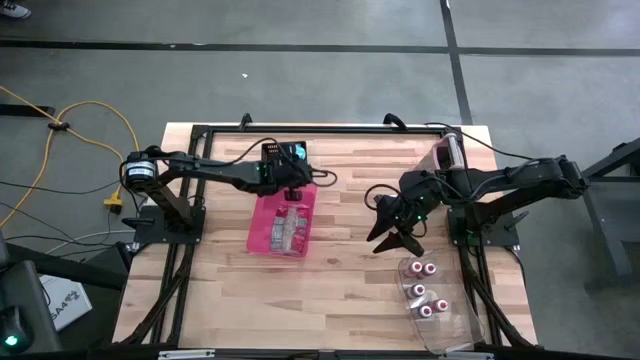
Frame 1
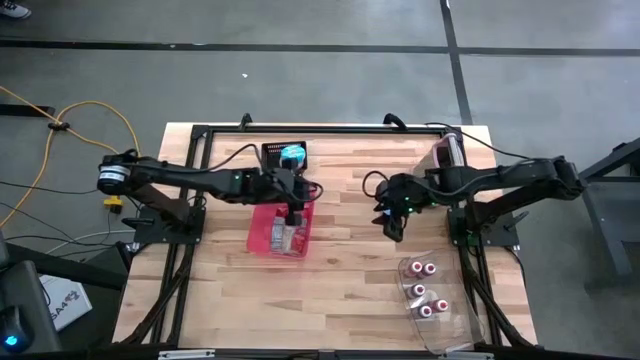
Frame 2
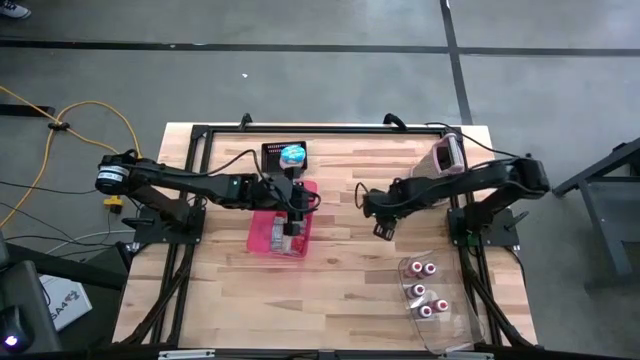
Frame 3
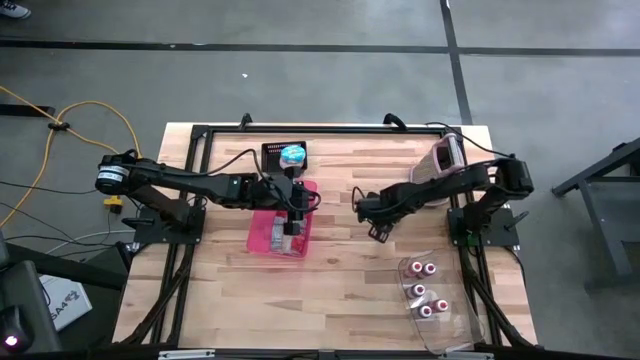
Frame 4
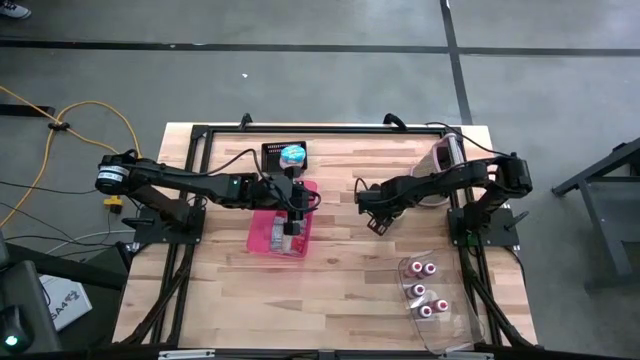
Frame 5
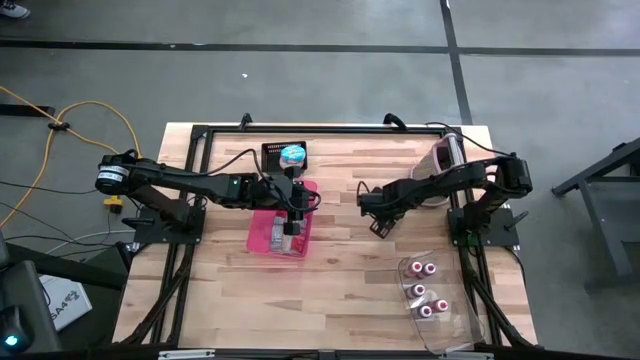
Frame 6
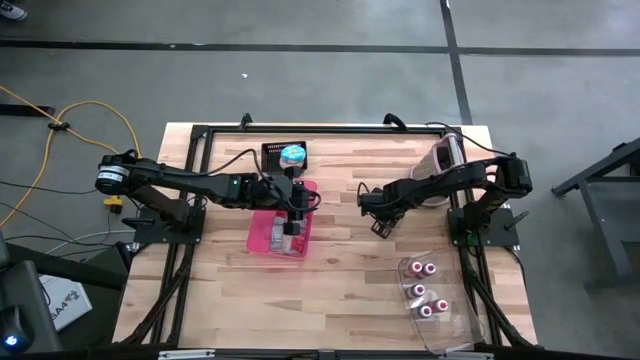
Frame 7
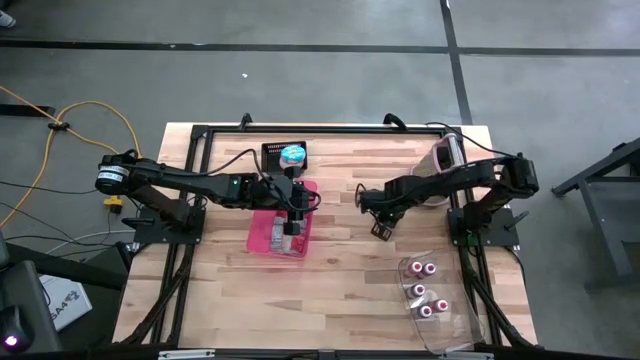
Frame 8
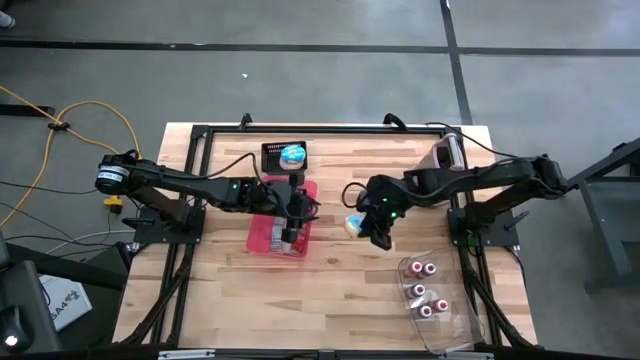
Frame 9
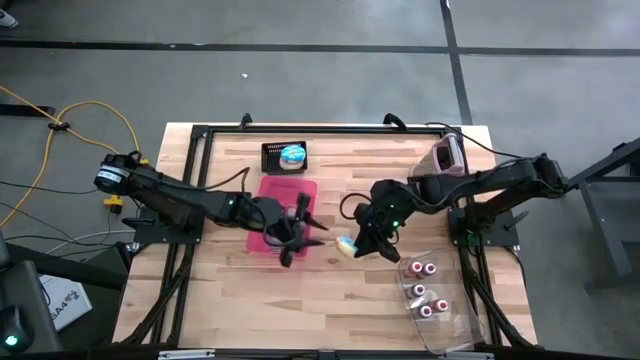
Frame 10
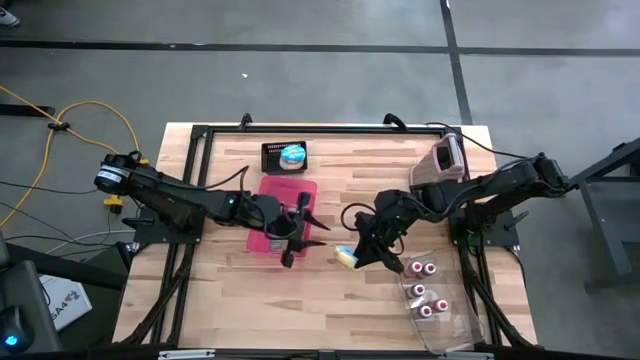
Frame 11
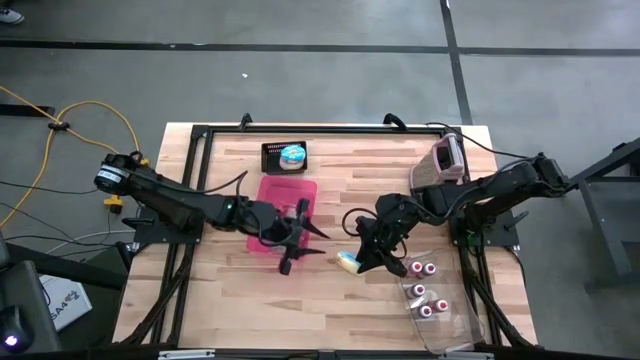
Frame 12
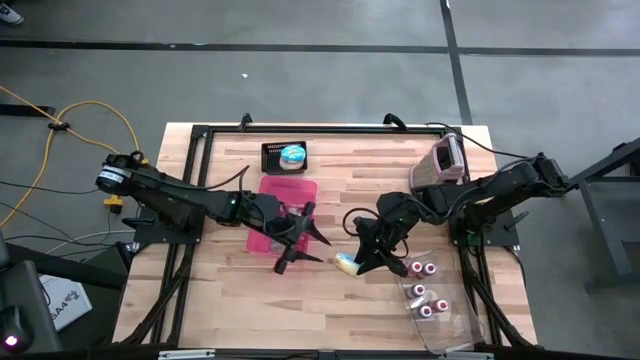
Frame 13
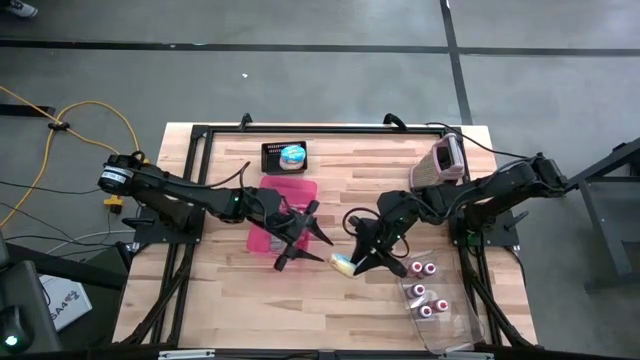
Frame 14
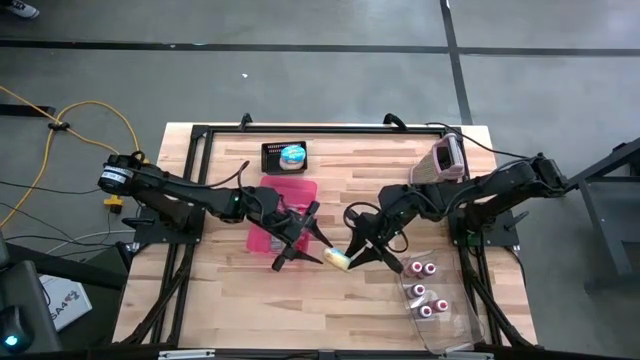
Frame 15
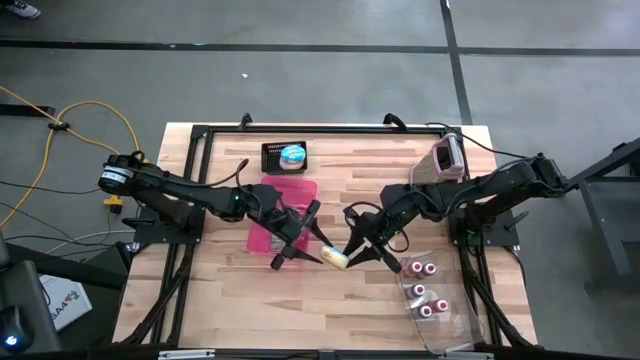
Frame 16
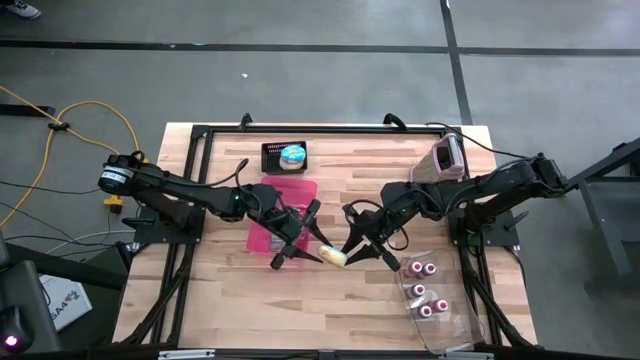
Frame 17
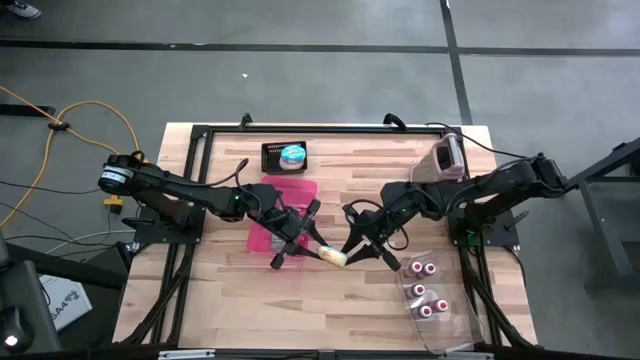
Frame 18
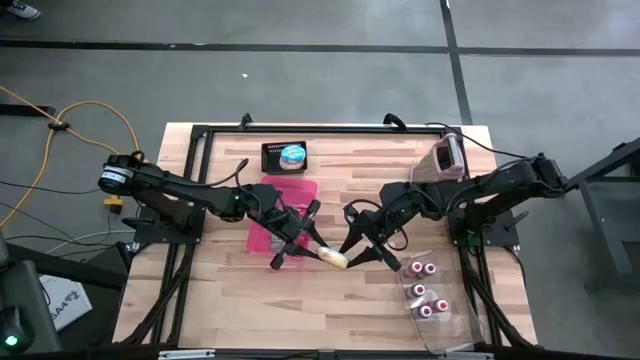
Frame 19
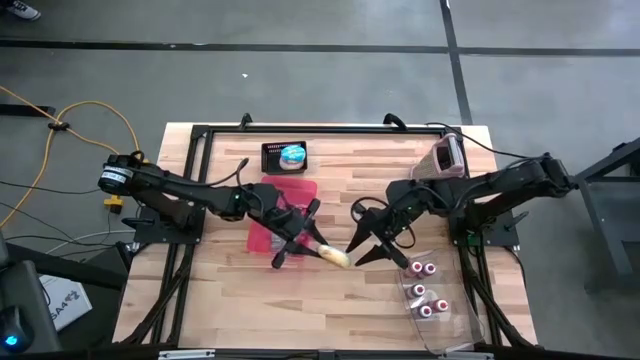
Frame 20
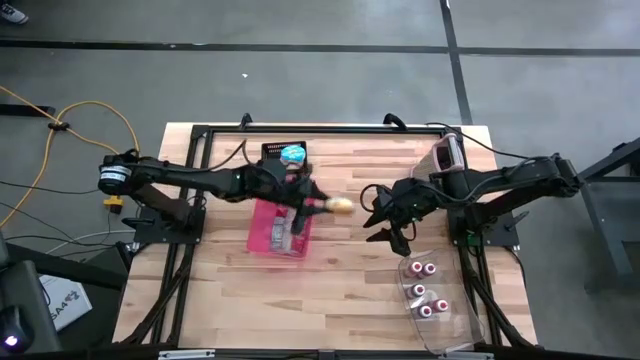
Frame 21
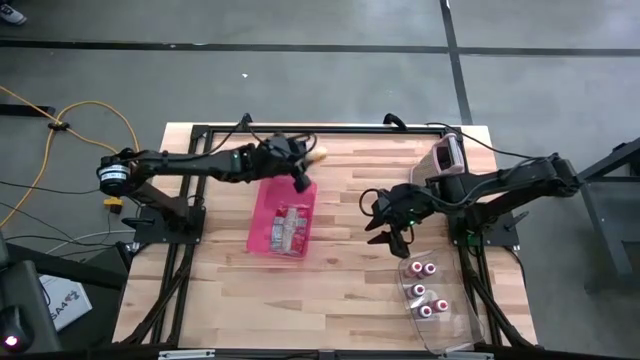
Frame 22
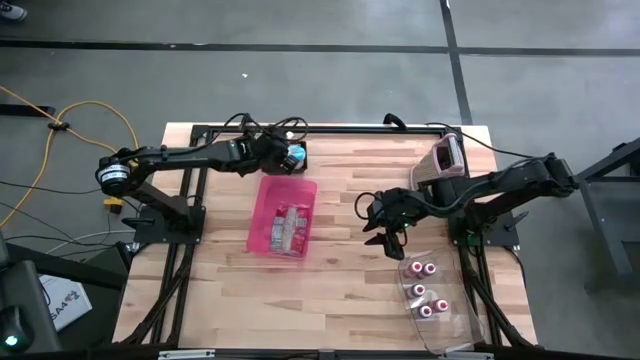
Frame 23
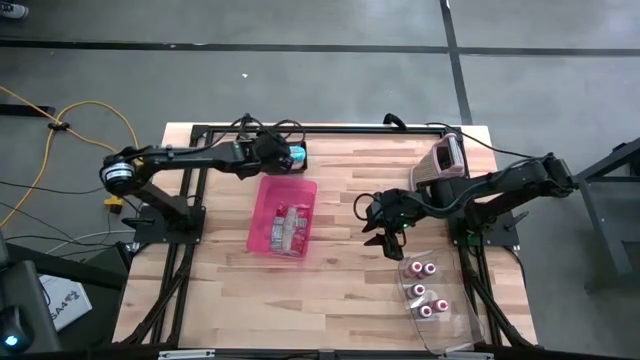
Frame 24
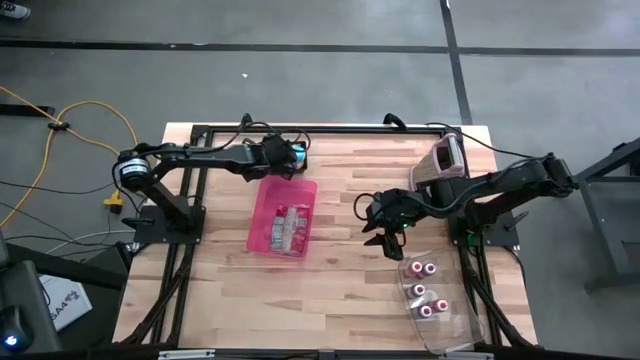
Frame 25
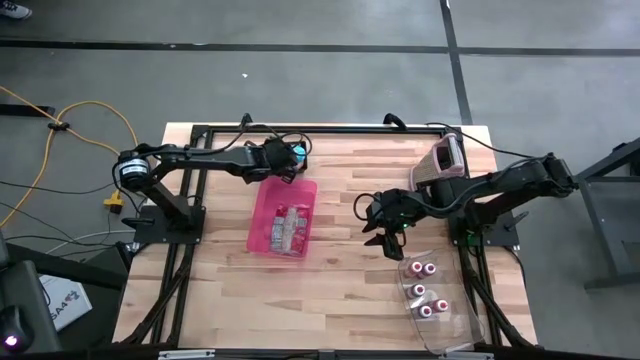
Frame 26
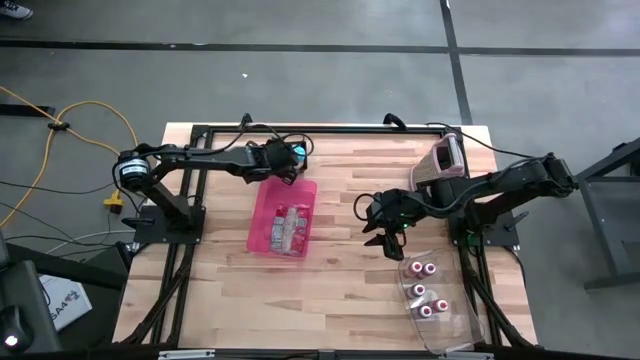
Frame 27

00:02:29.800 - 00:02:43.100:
Put the blue donut into the black bin

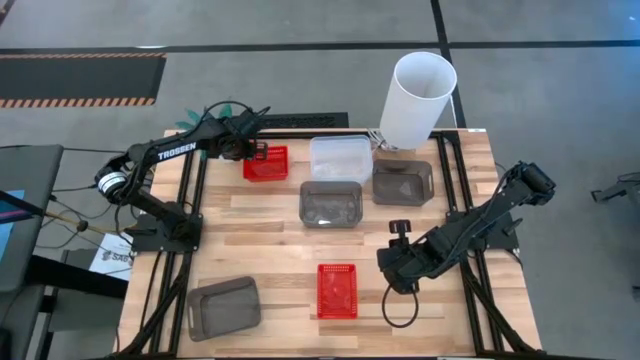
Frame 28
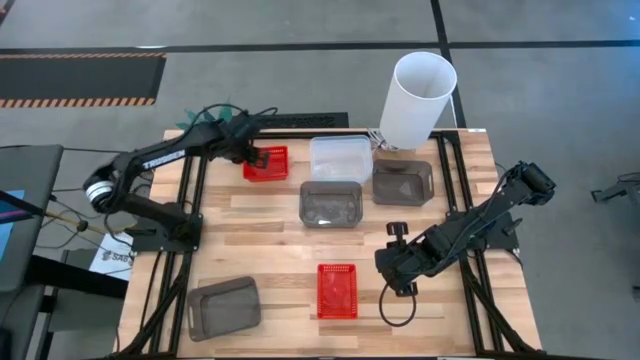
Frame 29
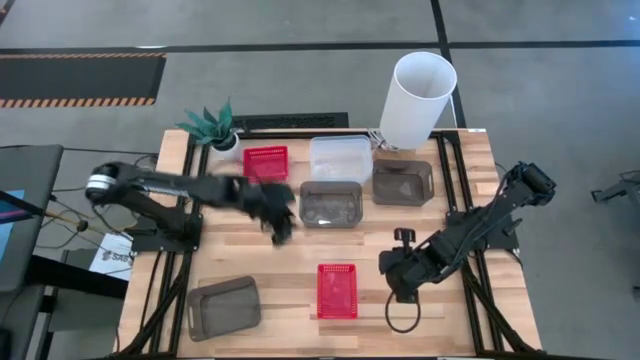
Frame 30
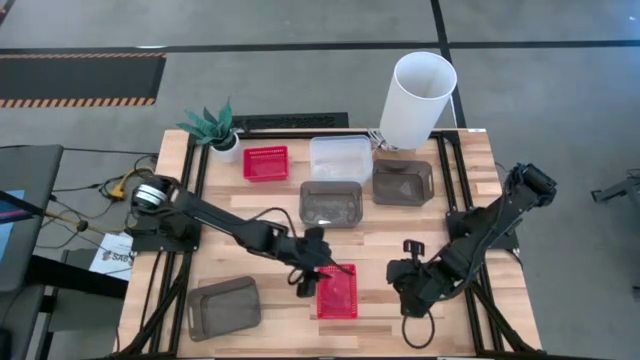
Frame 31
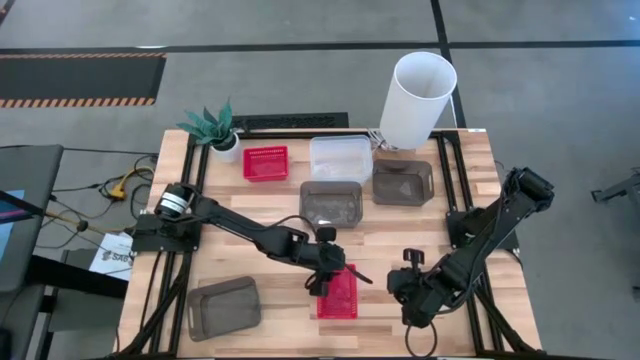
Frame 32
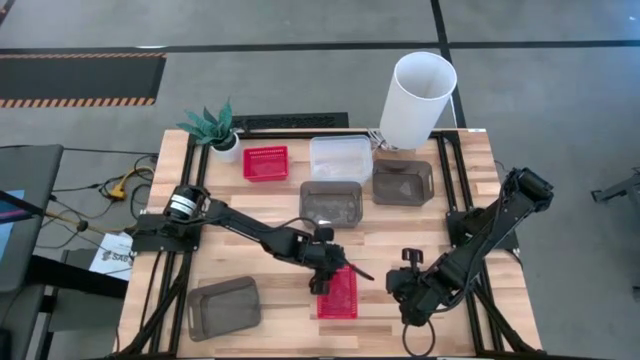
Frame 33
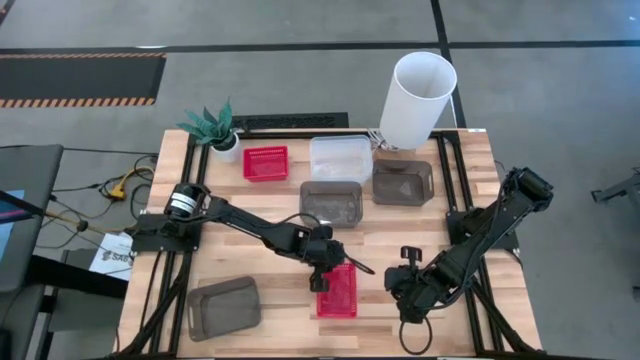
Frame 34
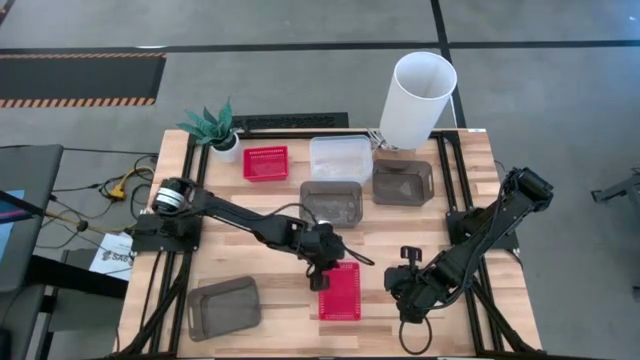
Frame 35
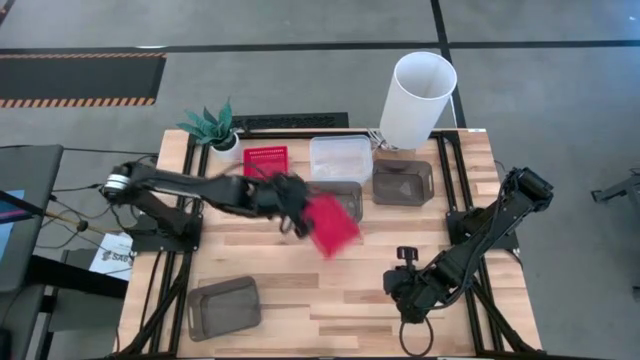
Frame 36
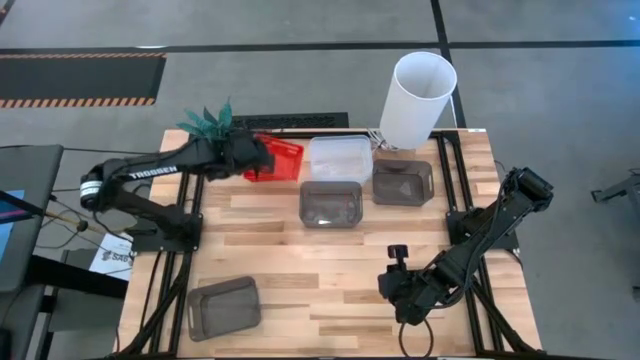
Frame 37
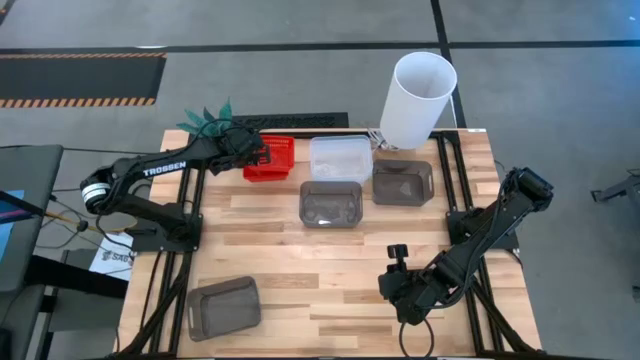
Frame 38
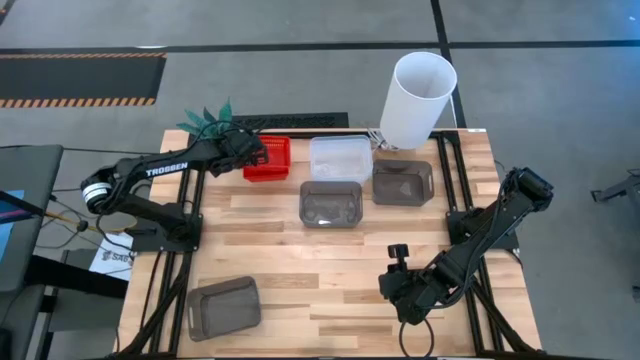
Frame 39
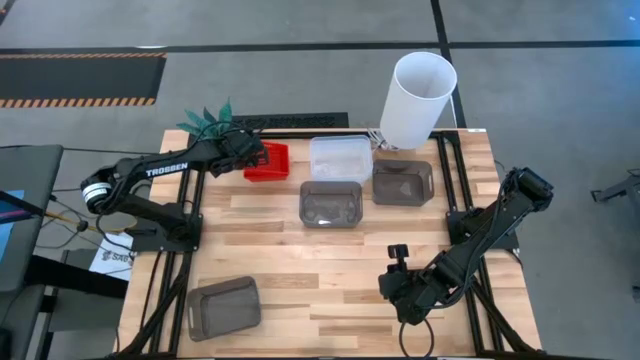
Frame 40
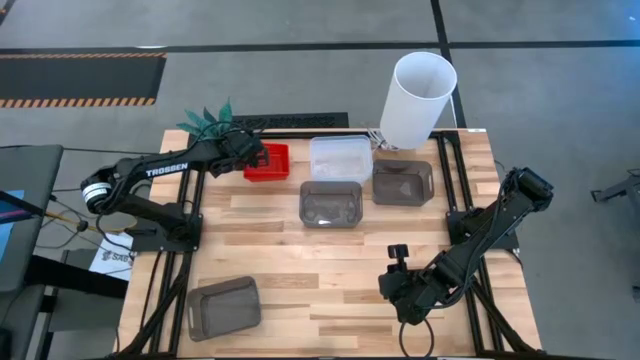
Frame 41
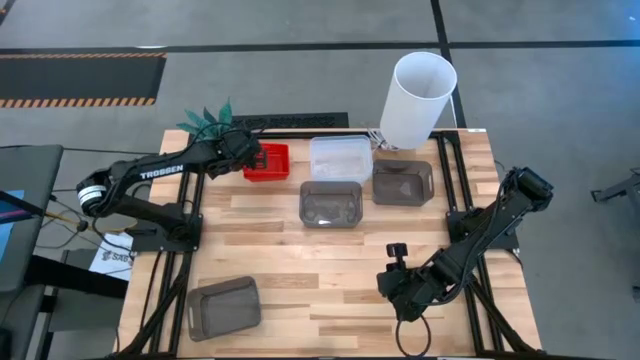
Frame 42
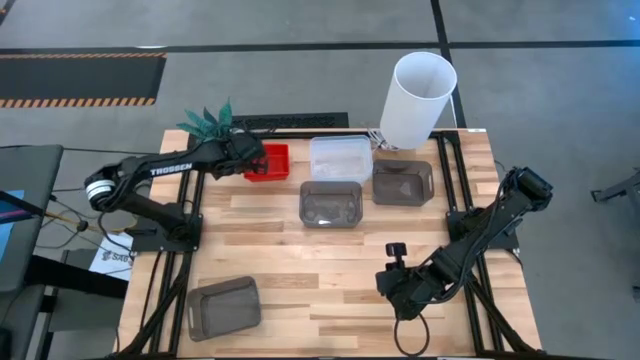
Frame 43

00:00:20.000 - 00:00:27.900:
Stack the red bin on top of the red bins
